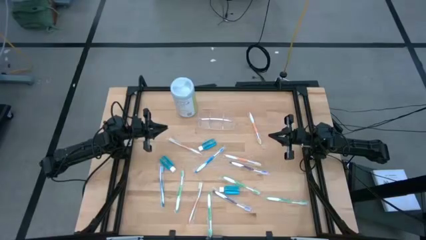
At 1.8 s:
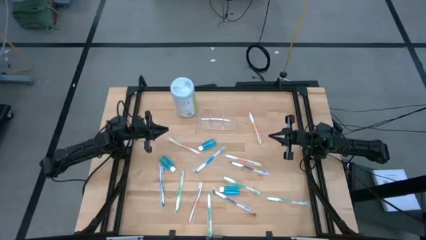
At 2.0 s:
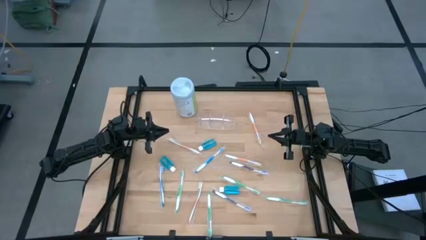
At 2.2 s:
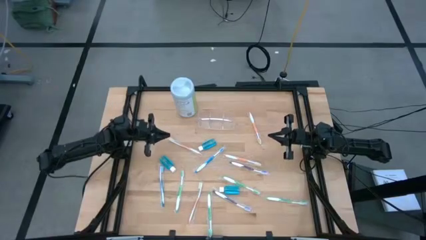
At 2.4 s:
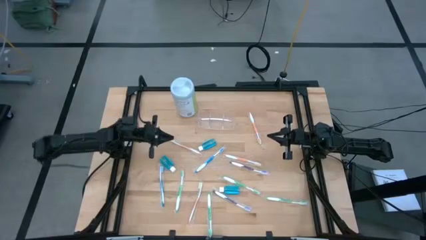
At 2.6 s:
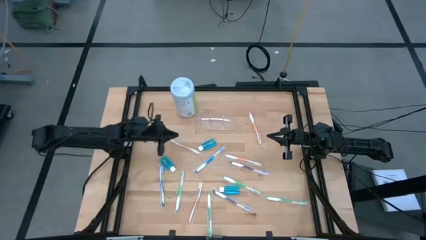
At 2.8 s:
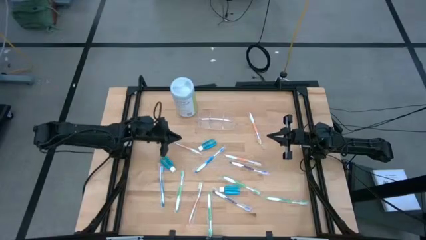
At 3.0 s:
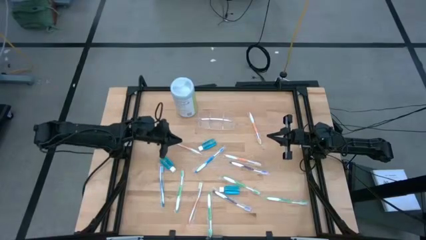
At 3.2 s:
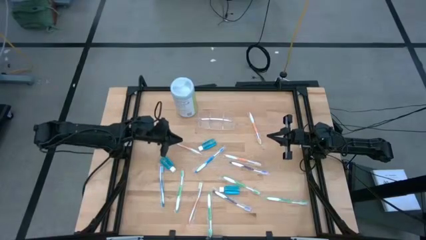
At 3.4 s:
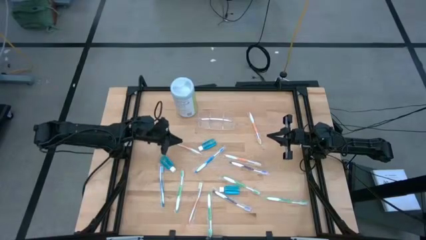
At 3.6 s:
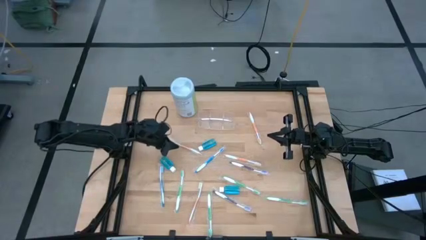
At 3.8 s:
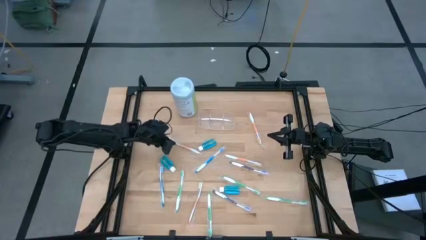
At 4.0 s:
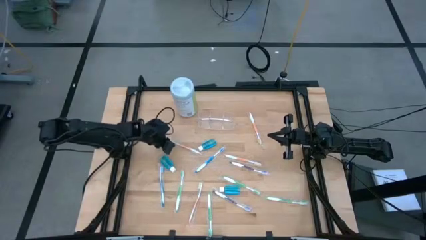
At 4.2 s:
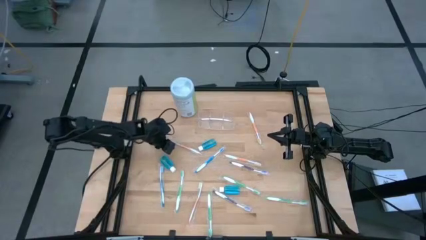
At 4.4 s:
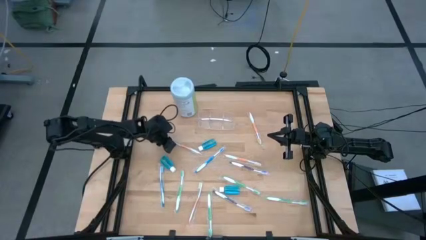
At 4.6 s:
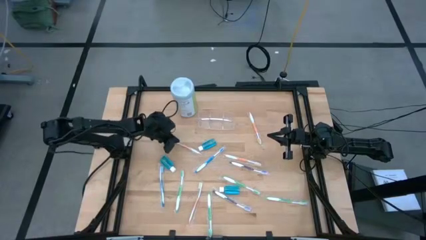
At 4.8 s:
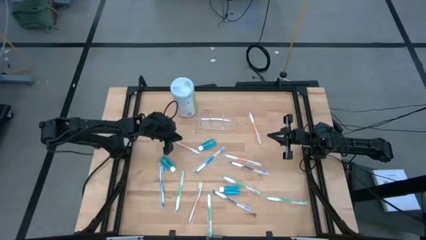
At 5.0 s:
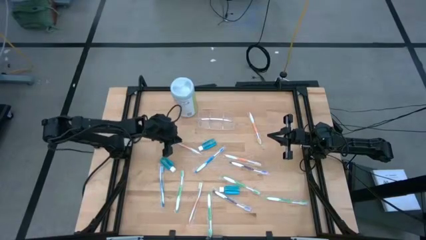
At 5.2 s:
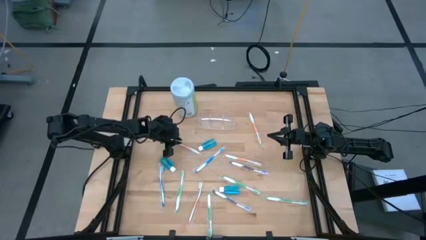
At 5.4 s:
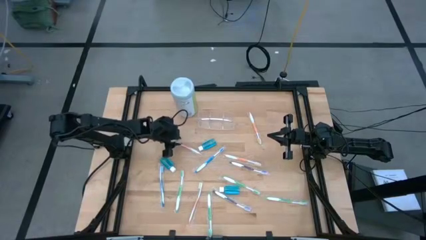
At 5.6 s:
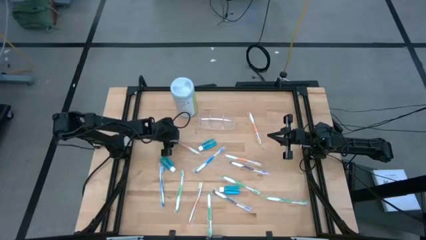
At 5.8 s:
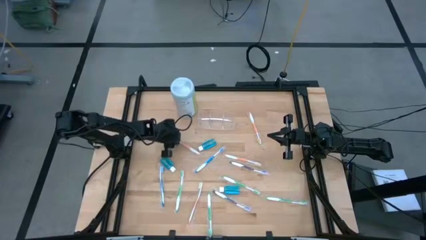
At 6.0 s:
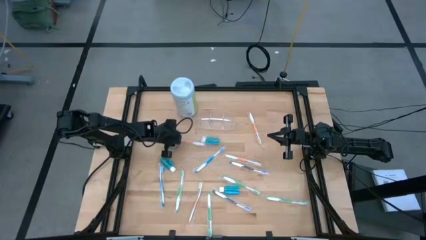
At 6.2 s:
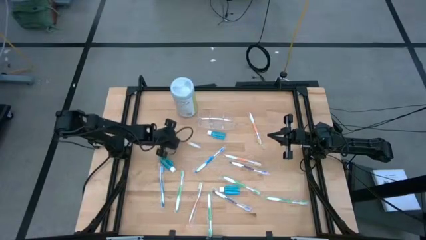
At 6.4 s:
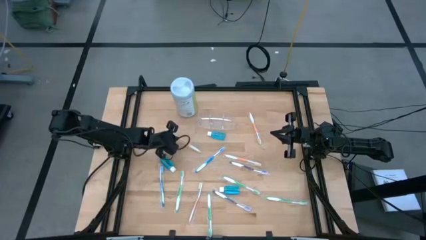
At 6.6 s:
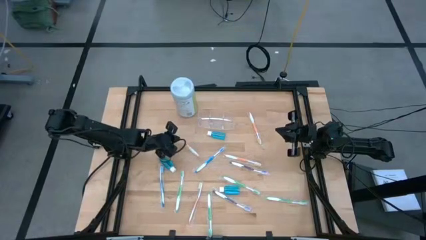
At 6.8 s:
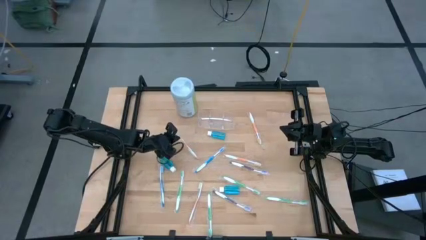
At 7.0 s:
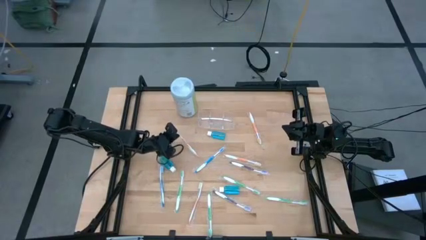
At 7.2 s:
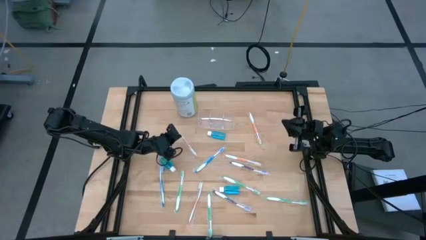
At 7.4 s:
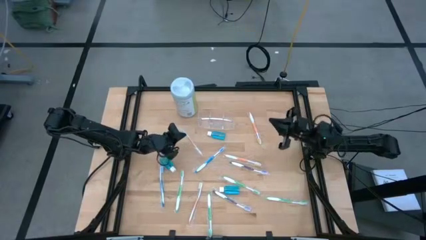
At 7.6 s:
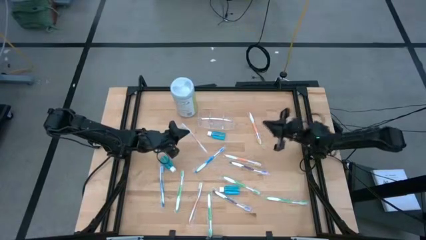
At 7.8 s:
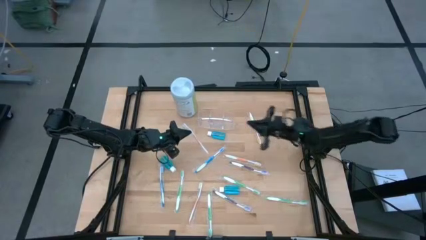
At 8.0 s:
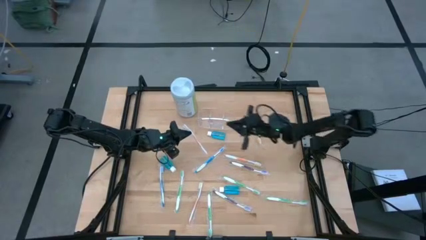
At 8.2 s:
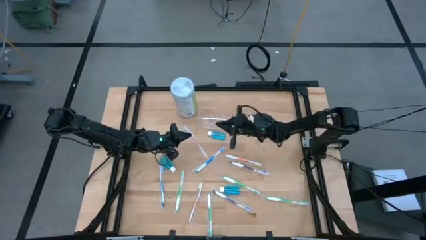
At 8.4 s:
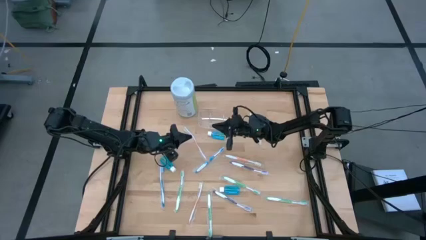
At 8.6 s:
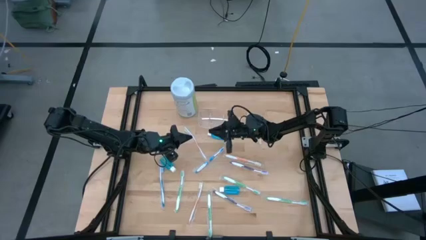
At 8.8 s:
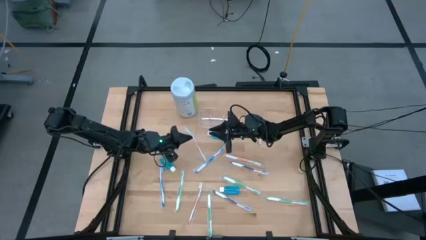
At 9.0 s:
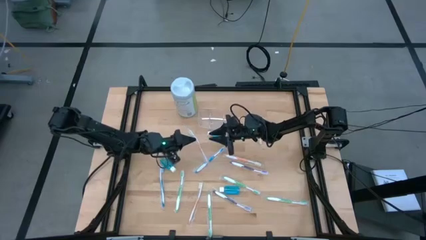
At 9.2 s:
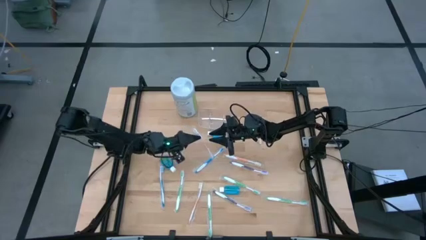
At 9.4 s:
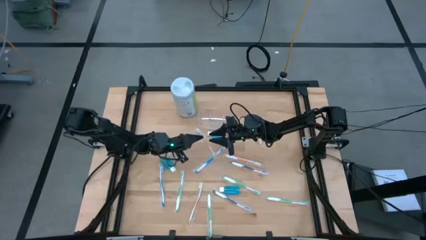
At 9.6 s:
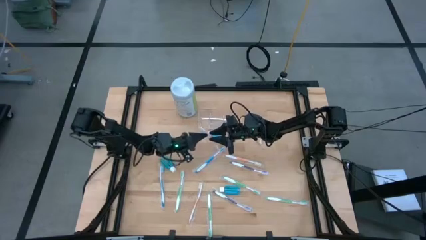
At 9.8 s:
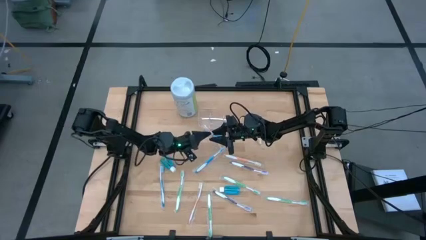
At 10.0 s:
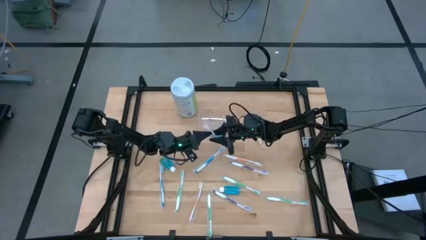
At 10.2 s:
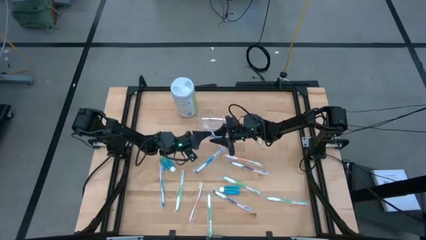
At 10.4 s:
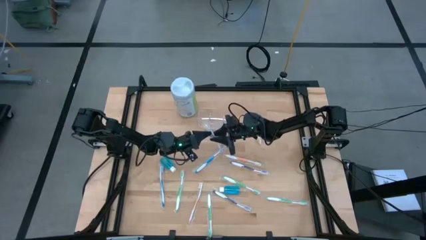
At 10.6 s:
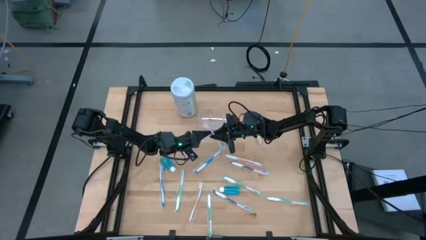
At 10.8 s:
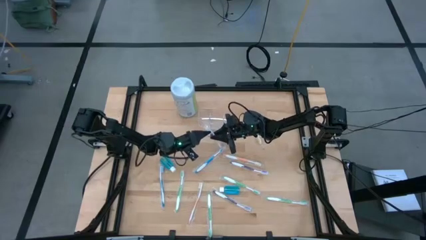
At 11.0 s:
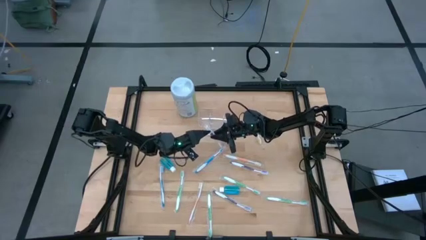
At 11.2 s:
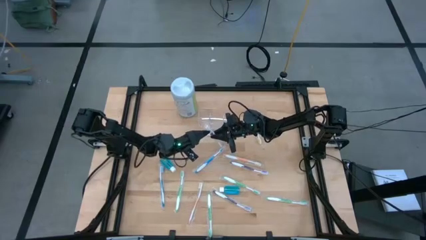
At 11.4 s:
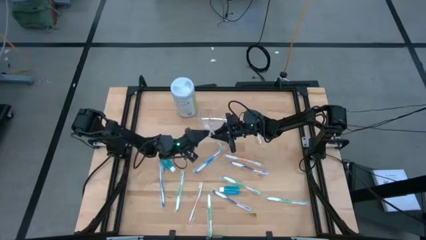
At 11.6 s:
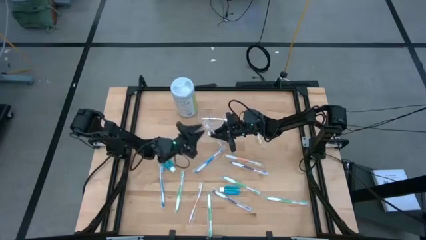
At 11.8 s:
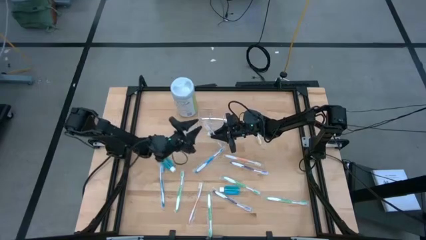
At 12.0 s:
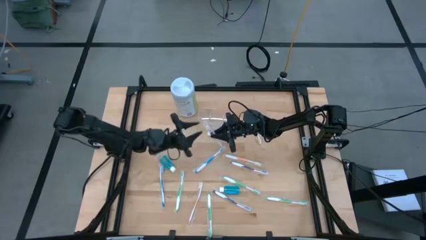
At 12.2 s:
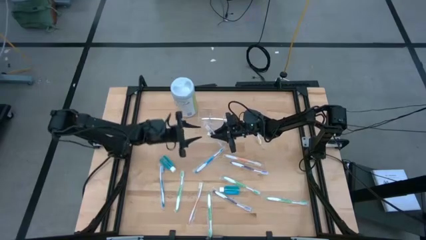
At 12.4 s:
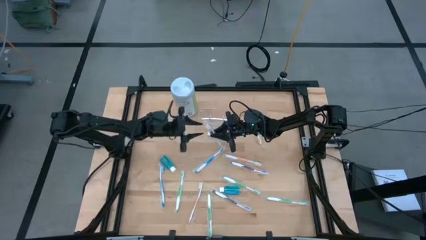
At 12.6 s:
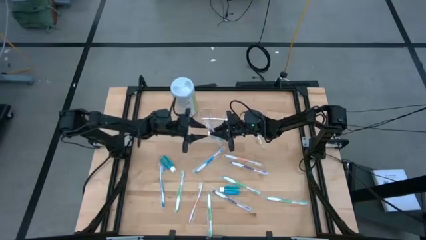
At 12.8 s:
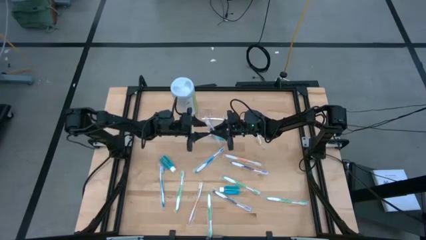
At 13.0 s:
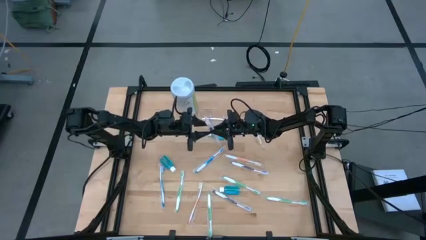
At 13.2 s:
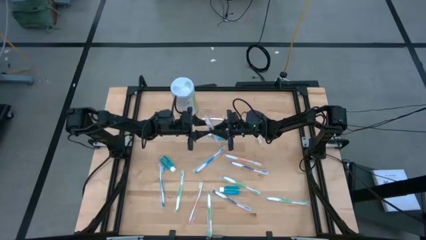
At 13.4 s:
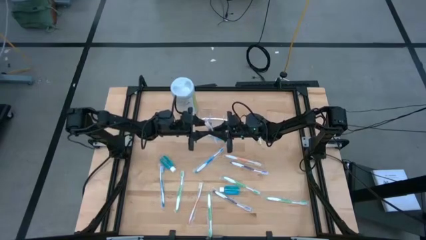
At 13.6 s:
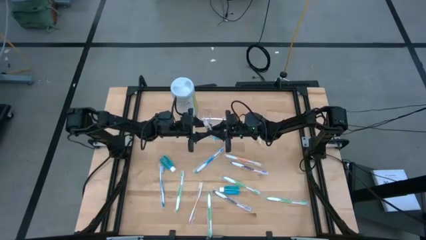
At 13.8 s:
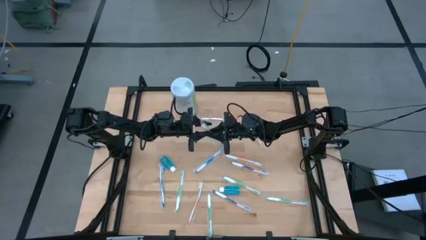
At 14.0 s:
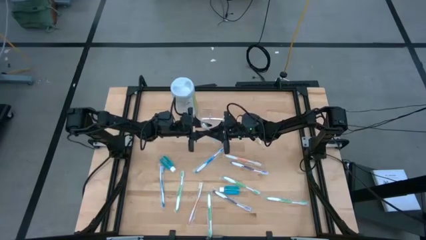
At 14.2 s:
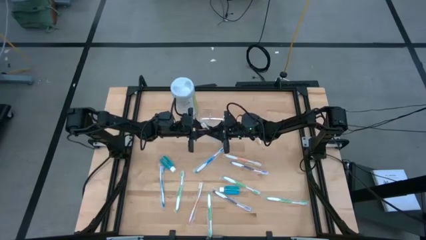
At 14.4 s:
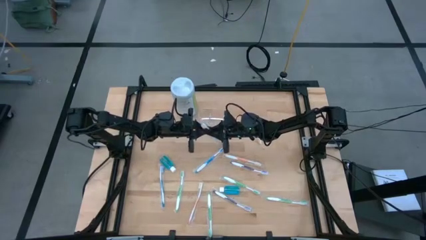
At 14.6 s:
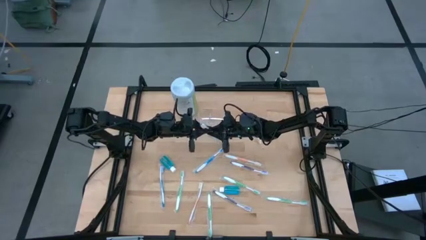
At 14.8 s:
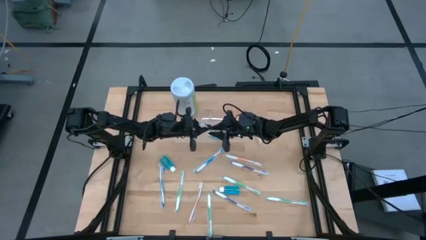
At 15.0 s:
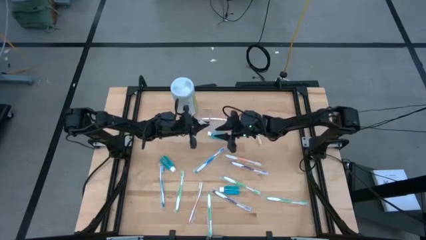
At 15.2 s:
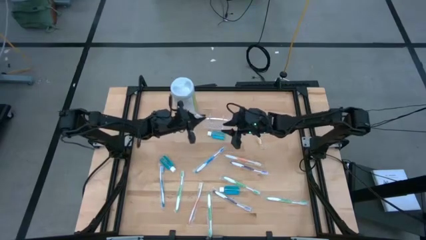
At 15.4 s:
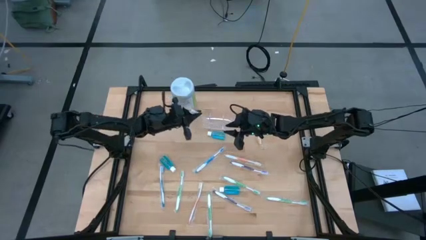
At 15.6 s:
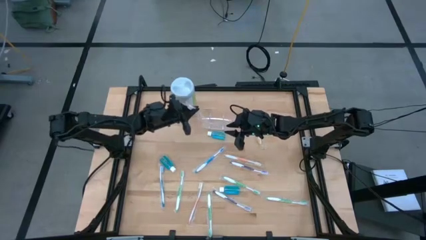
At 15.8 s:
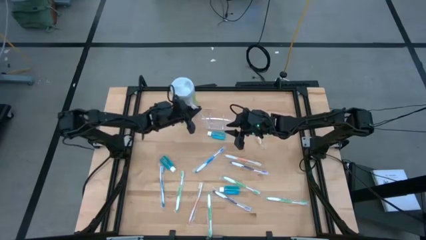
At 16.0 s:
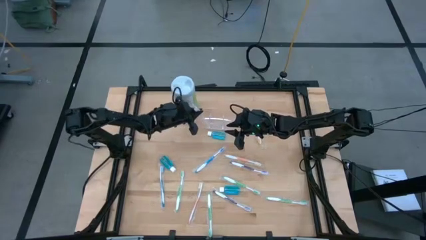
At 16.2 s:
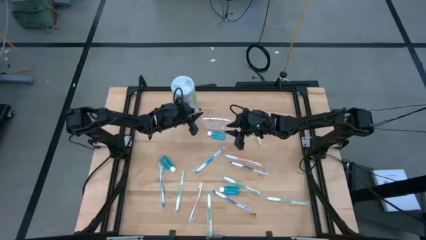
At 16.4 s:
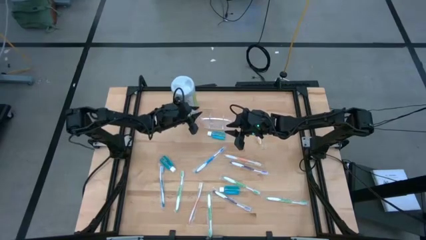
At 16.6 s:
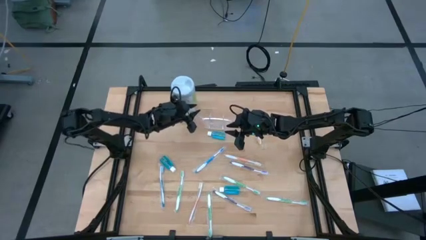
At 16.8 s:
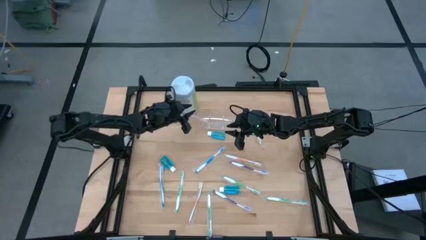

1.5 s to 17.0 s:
Task: Pick & Place toothbrushing station
Put the orange toothbrush into the transparent organizer
